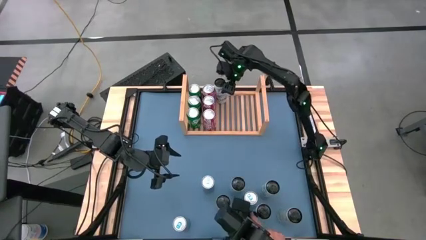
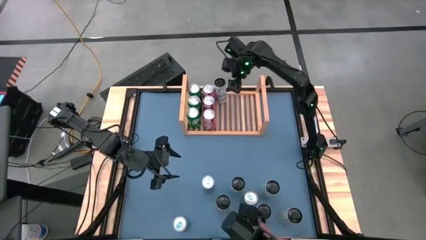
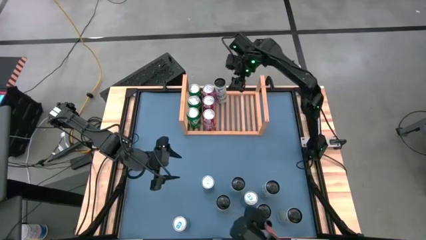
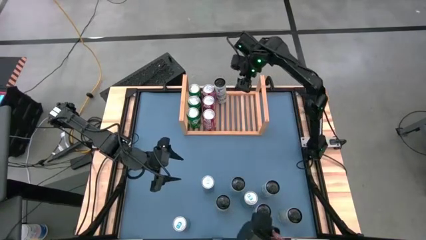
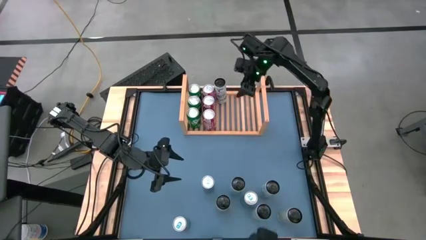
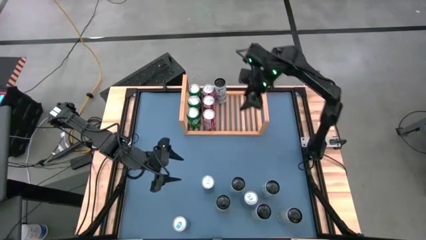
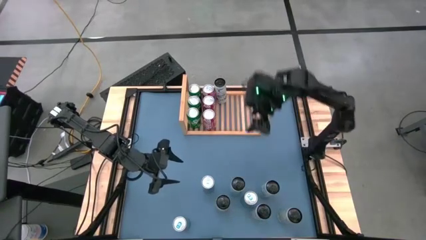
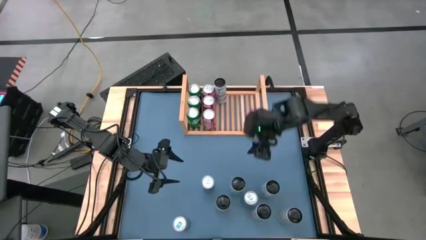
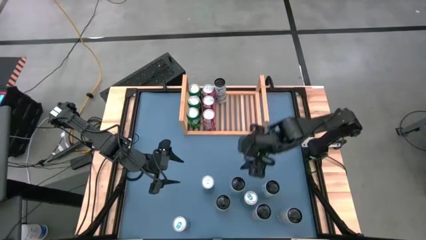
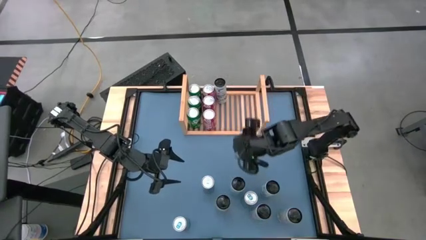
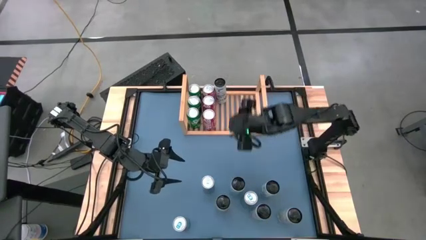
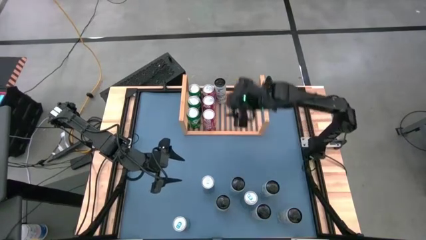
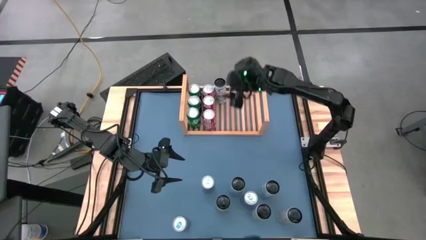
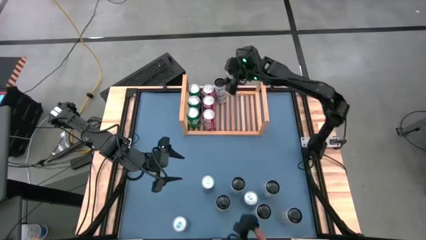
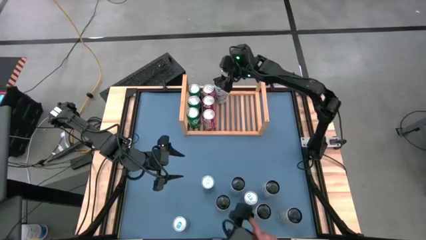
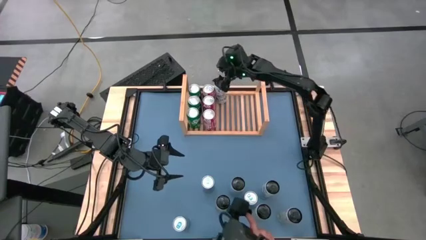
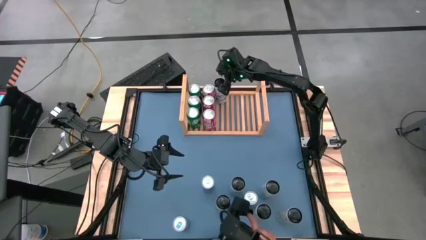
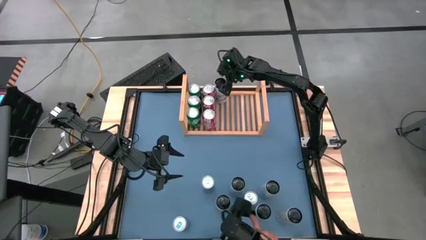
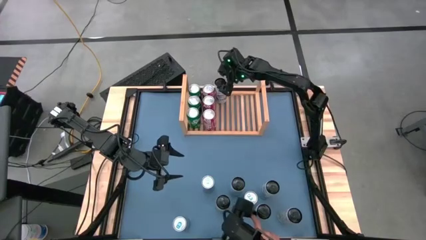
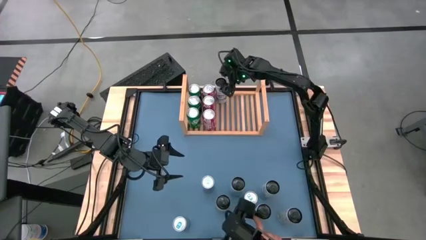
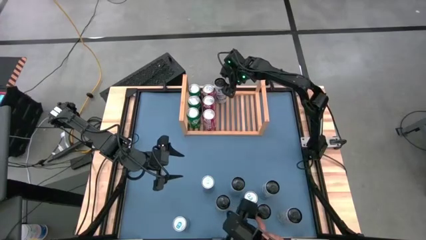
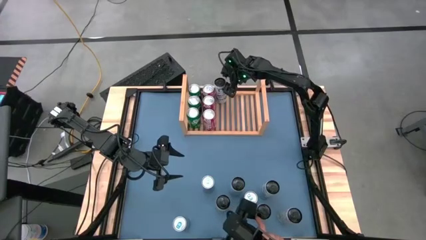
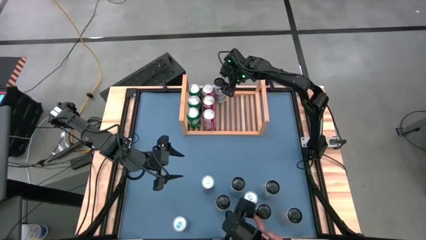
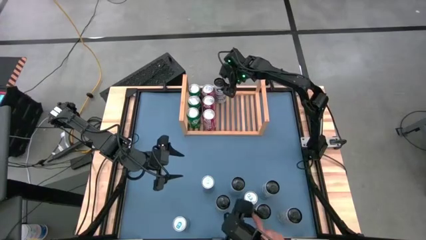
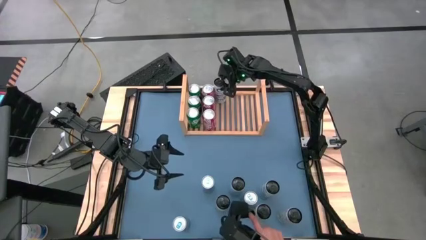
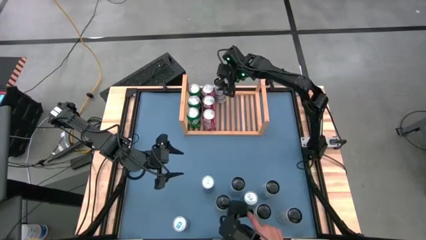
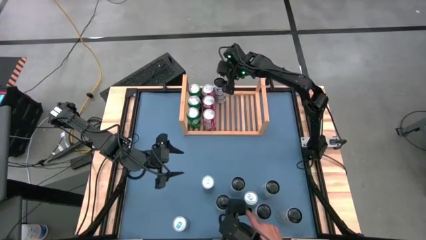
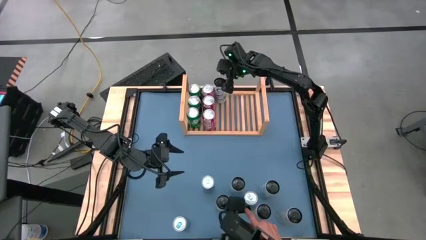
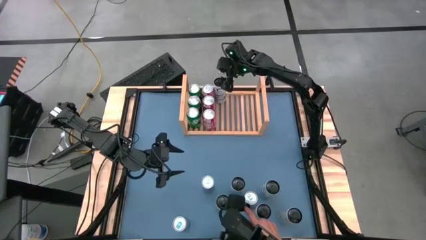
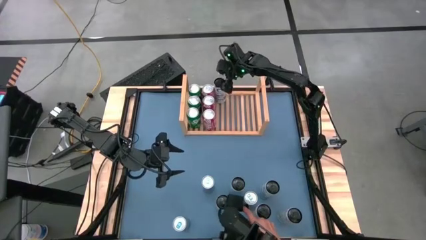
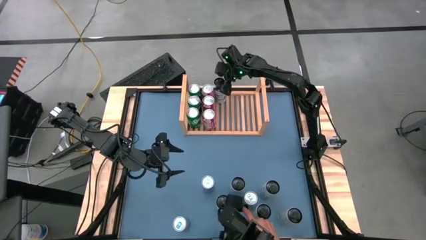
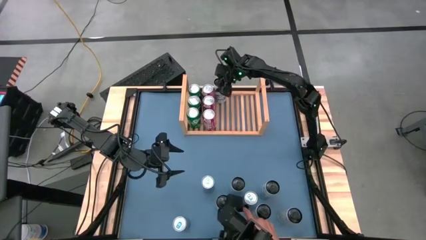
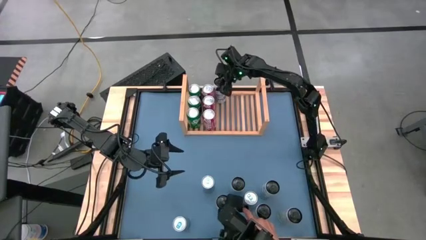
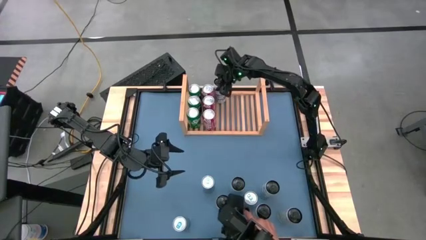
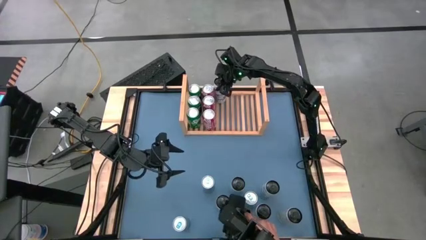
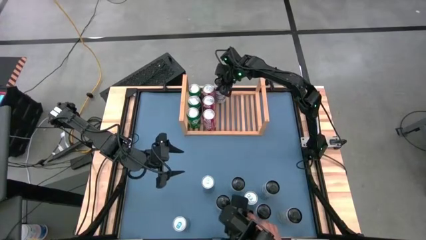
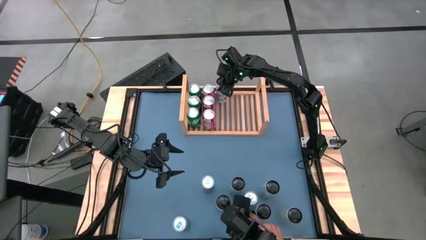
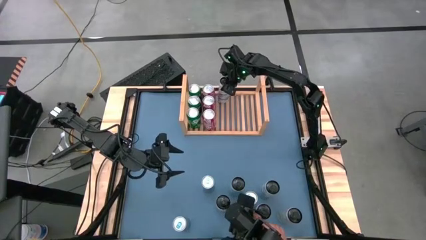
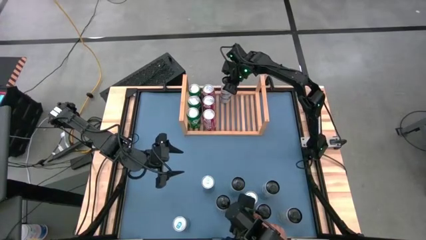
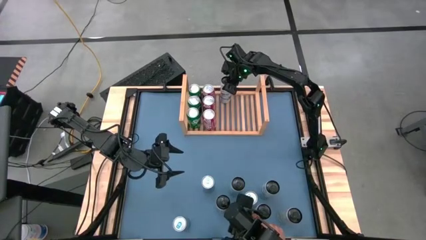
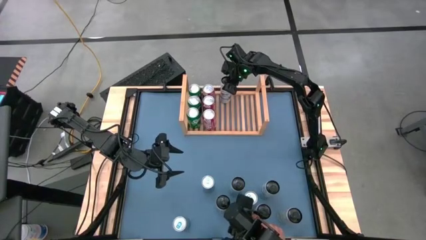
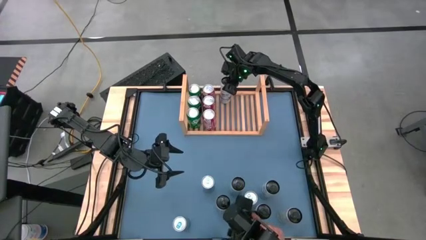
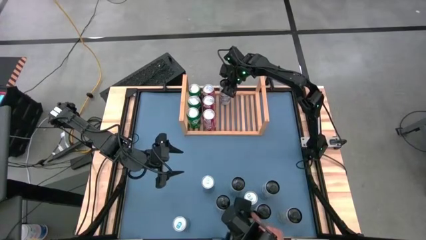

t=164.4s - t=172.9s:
Task: Place canned beverage on shelf
Adjust the white and blue soda can on the shelf

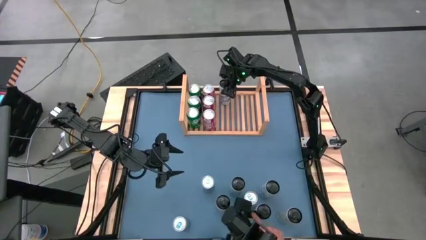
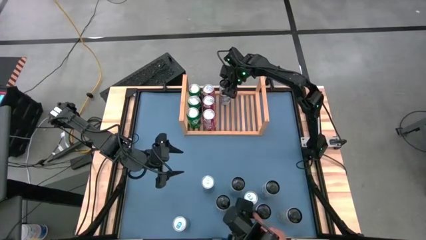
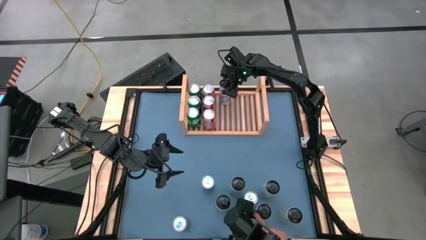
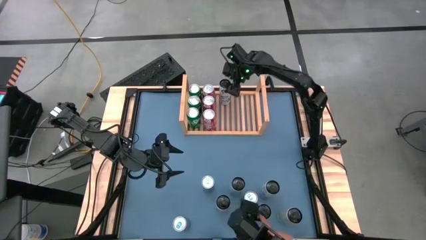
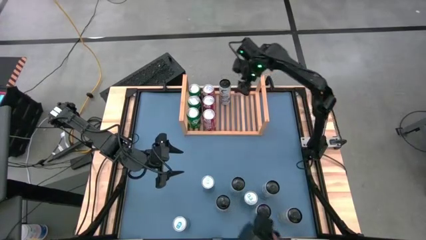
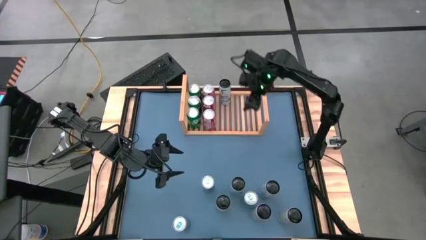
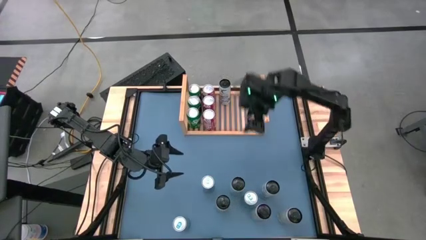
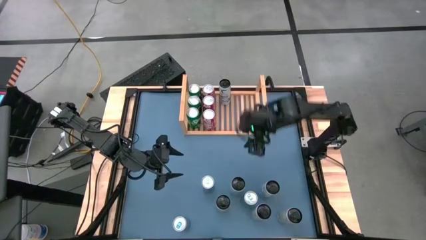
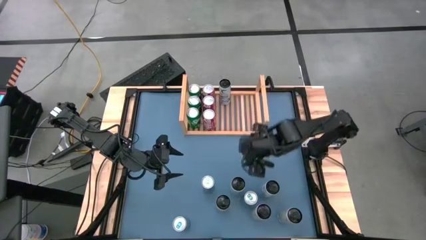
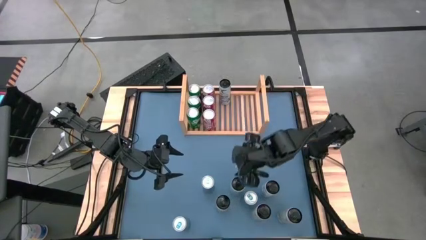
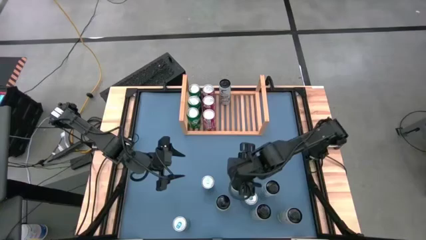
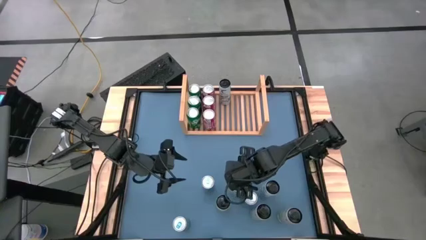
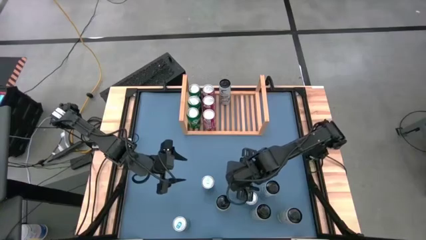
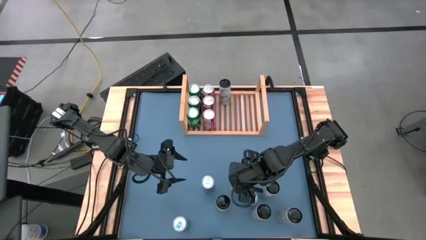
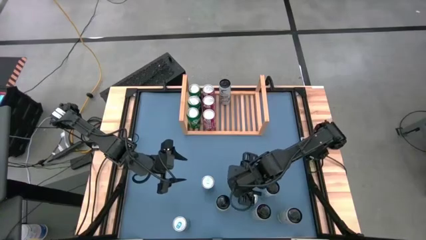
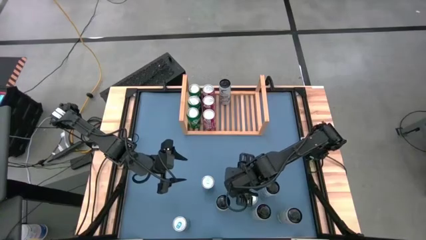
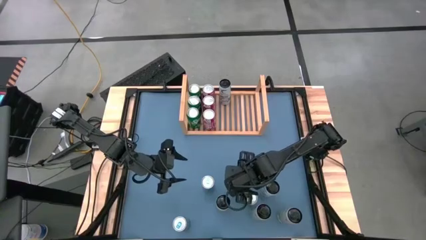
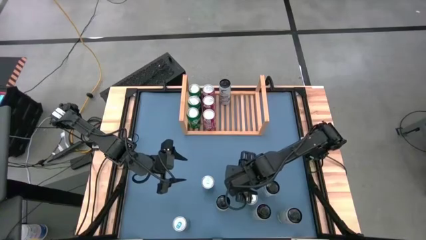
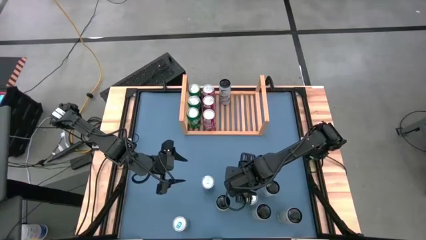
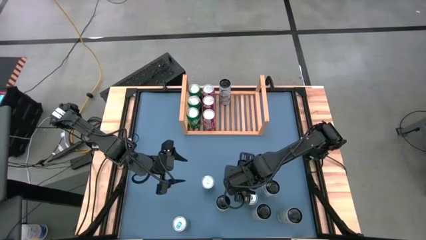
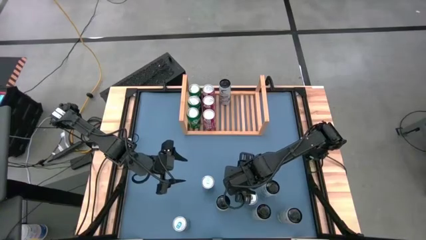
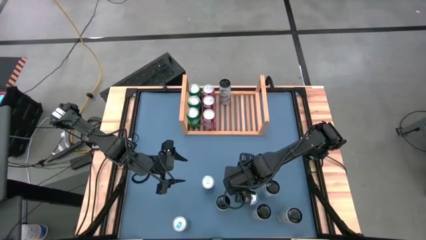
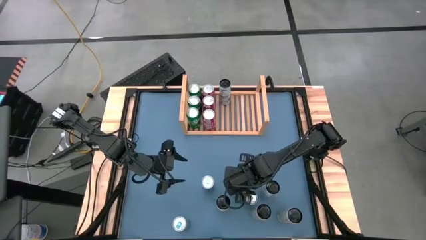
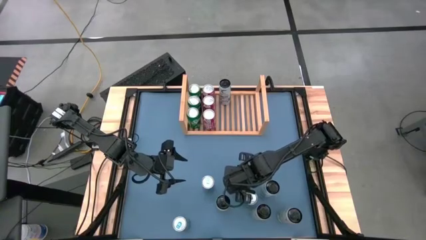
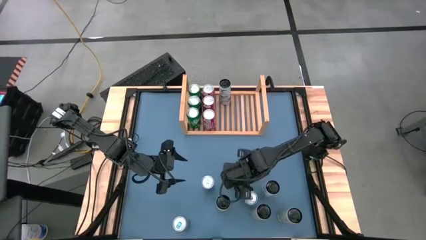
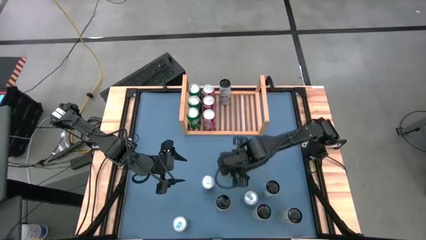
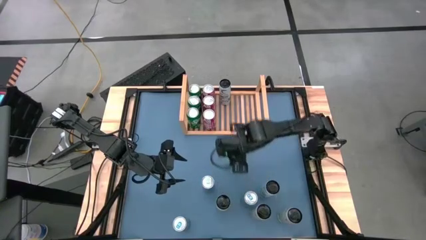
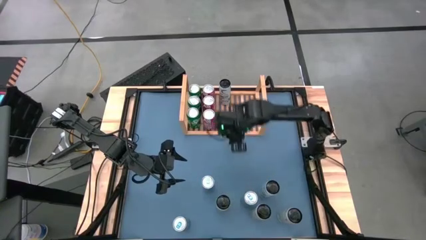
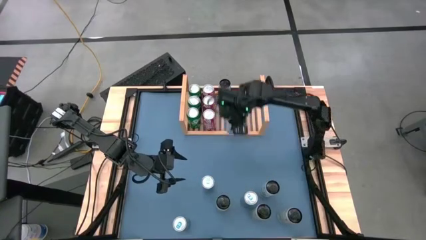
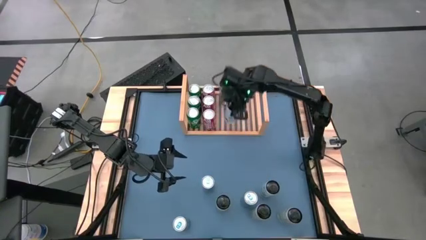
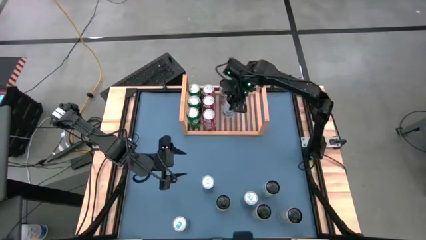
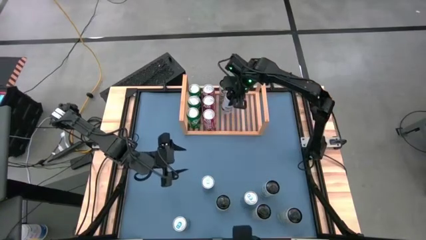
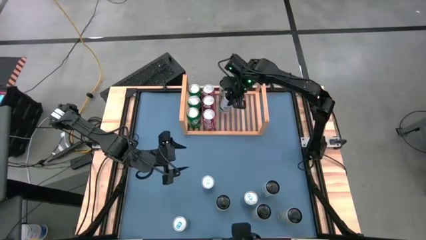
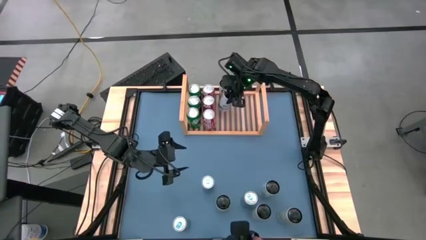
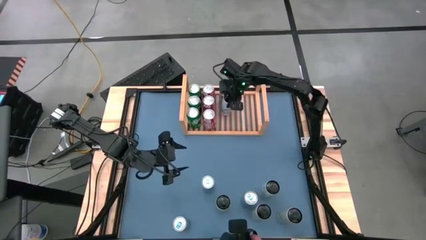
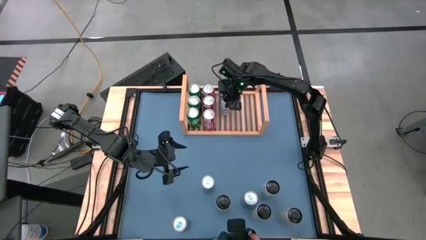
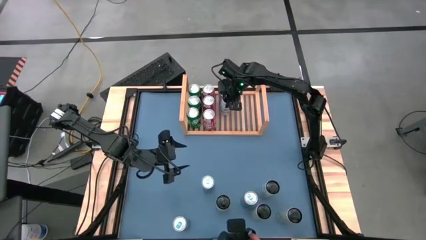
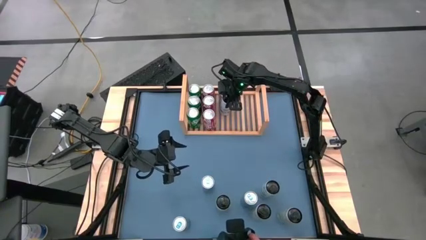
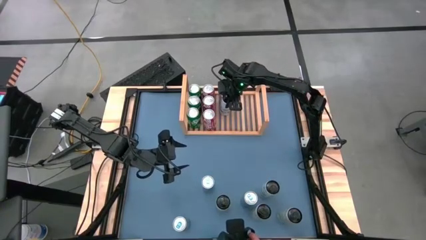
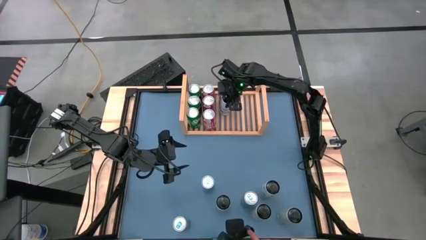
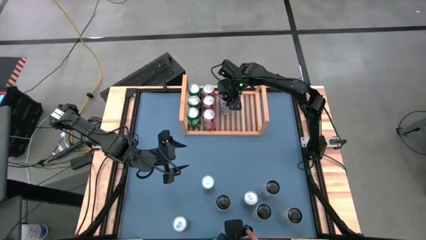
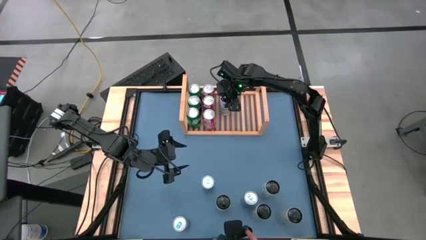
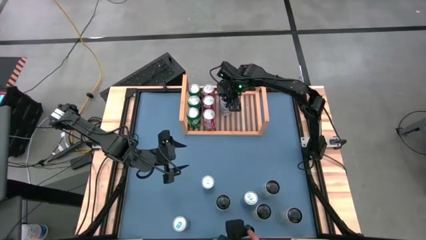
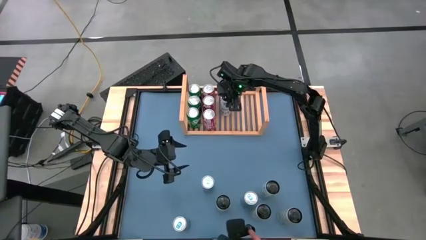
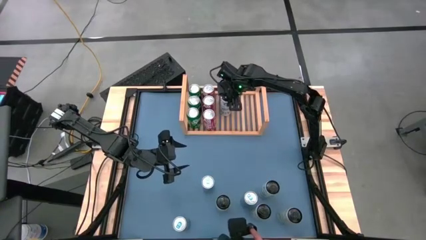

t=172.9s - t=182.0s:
Put the middle white-blue can aligned with the white-blue soda on the shelf
